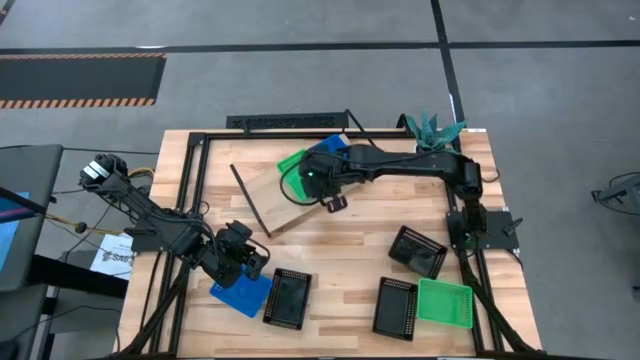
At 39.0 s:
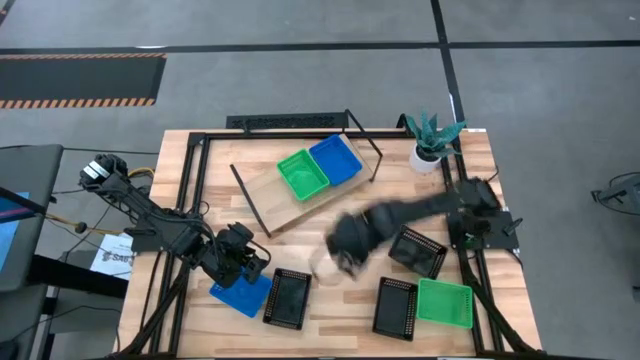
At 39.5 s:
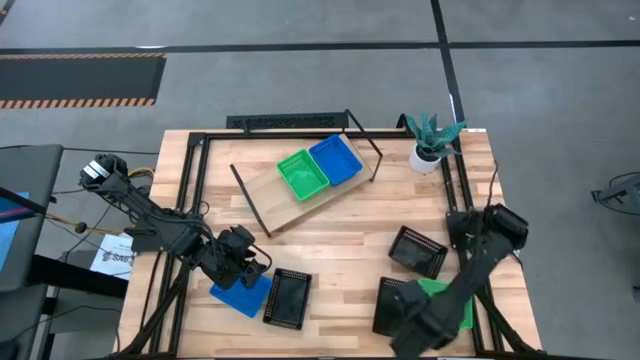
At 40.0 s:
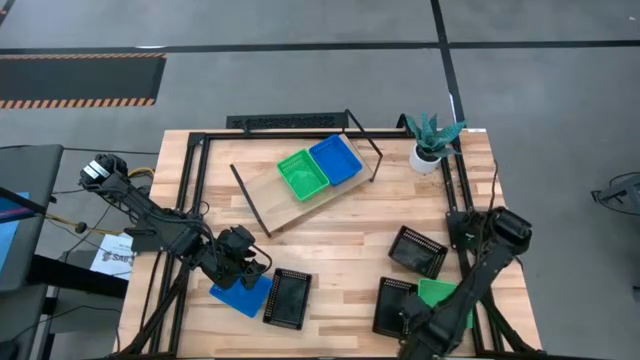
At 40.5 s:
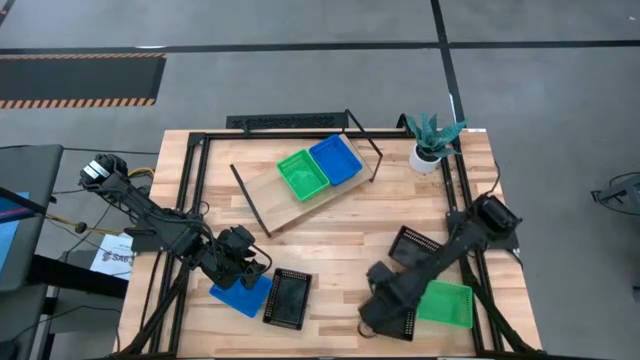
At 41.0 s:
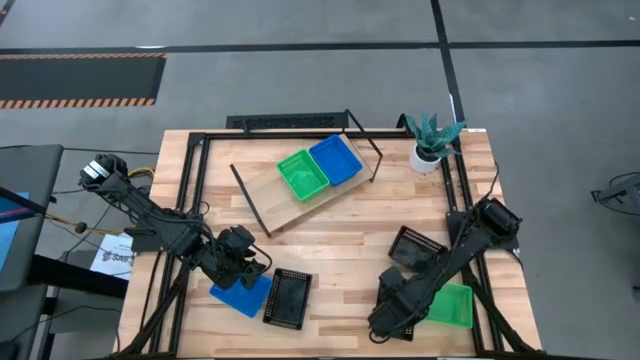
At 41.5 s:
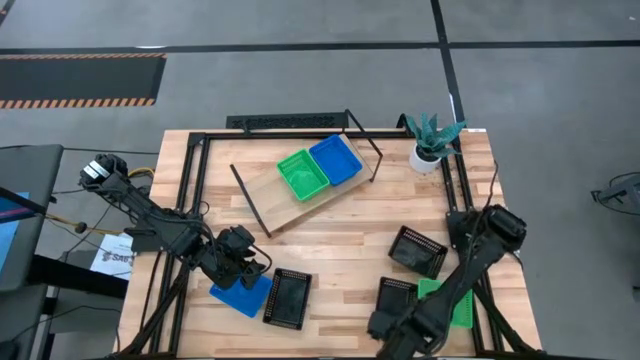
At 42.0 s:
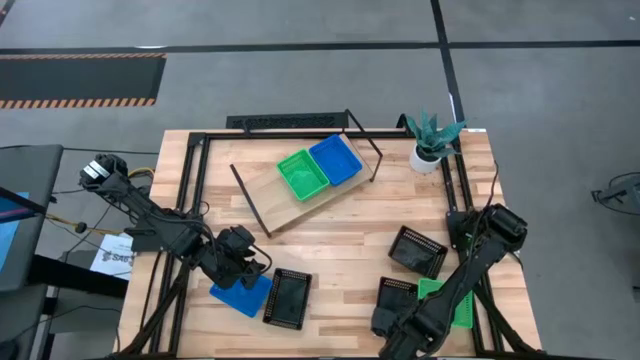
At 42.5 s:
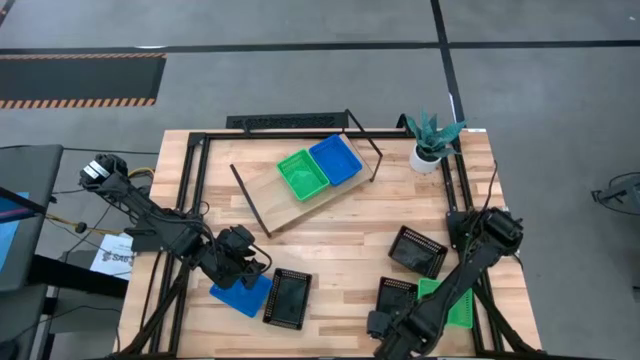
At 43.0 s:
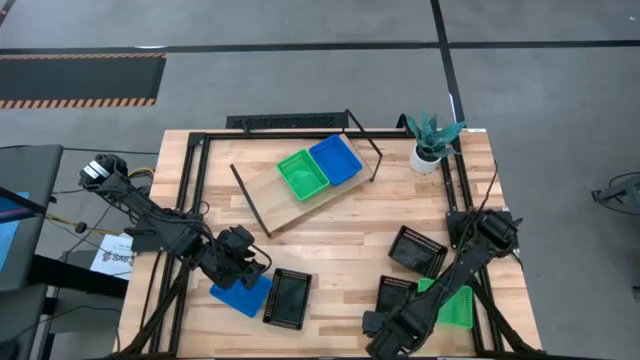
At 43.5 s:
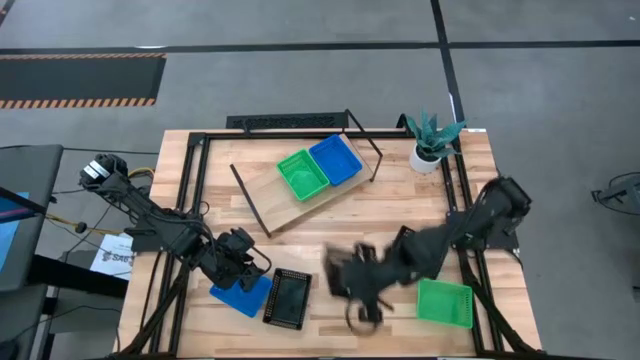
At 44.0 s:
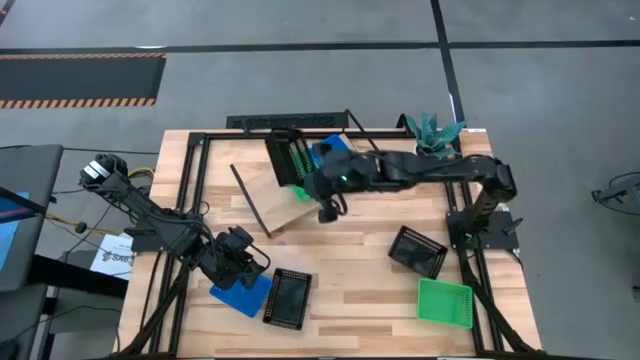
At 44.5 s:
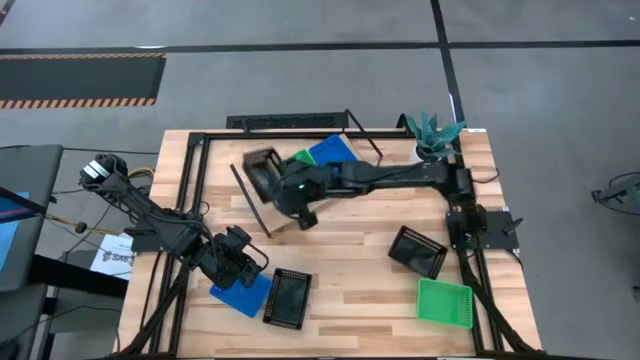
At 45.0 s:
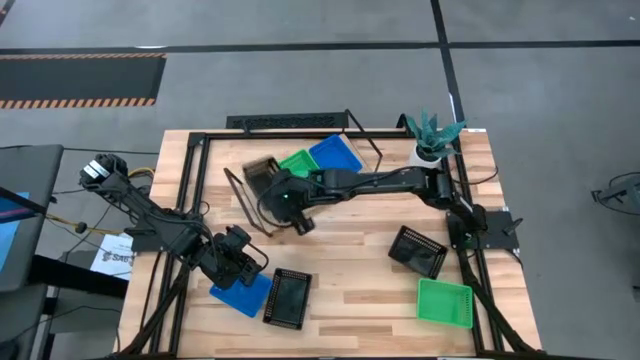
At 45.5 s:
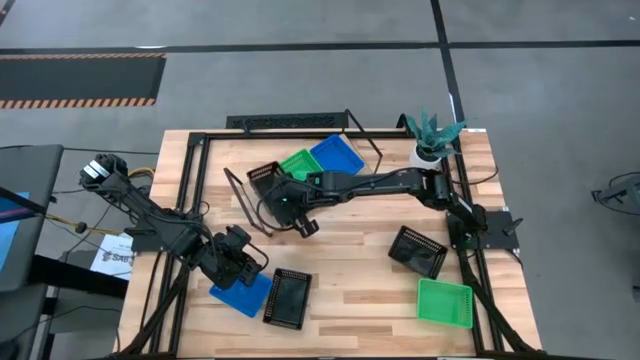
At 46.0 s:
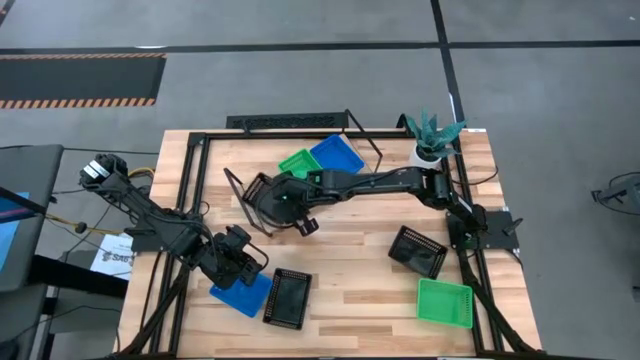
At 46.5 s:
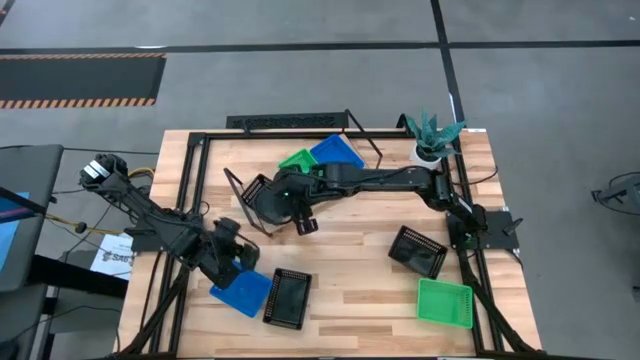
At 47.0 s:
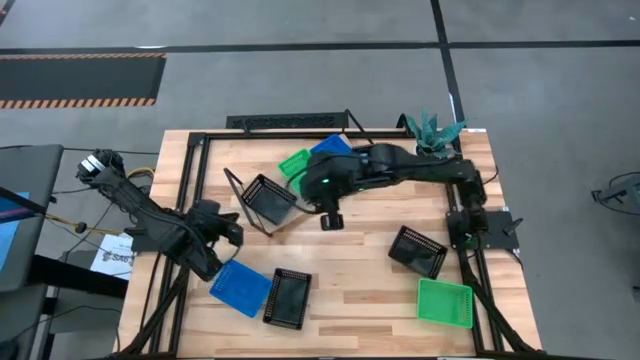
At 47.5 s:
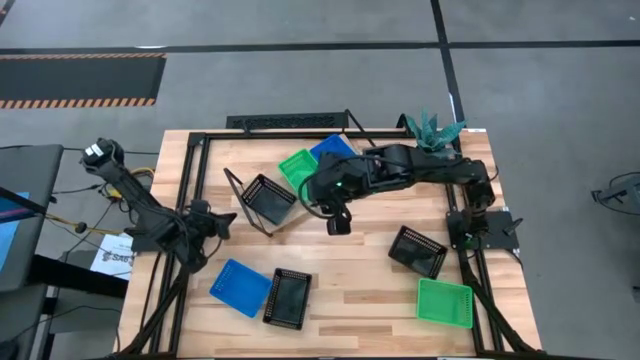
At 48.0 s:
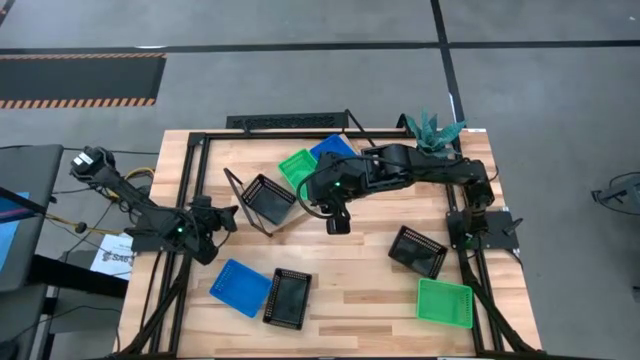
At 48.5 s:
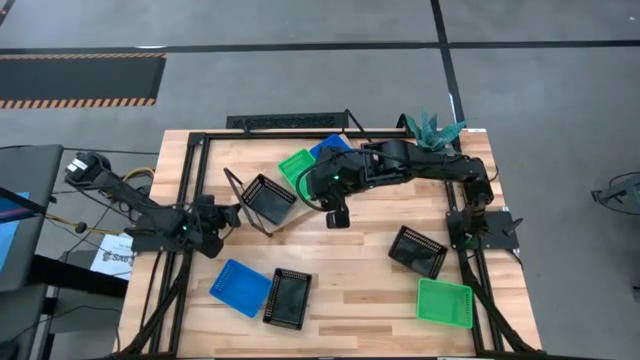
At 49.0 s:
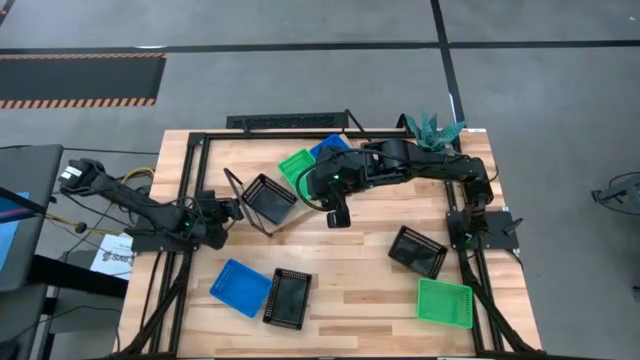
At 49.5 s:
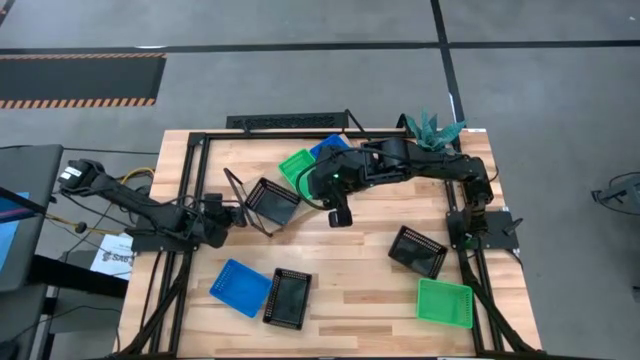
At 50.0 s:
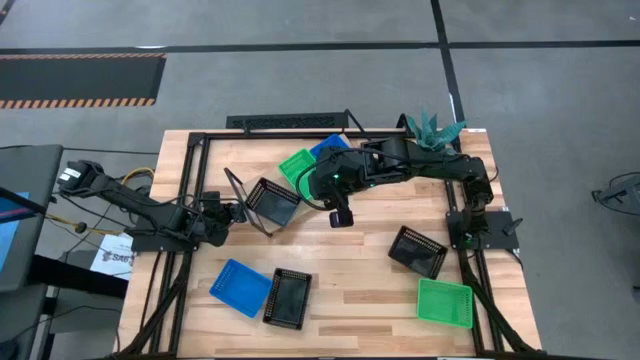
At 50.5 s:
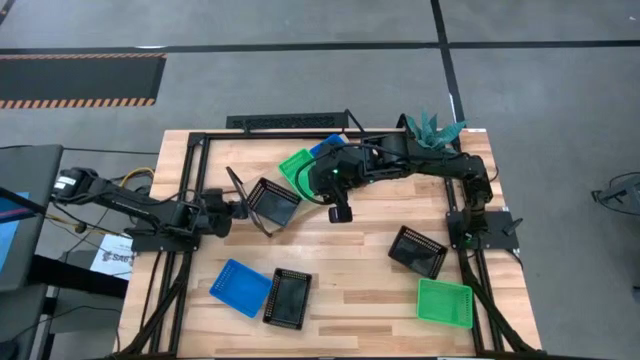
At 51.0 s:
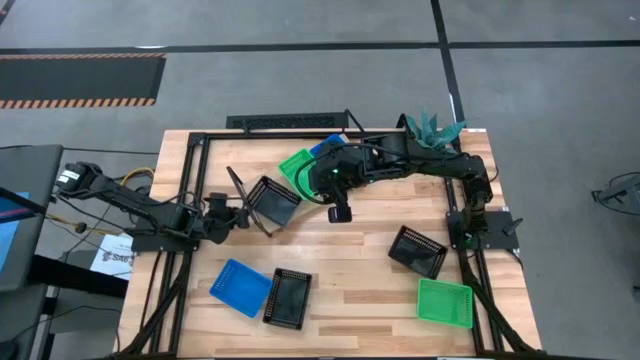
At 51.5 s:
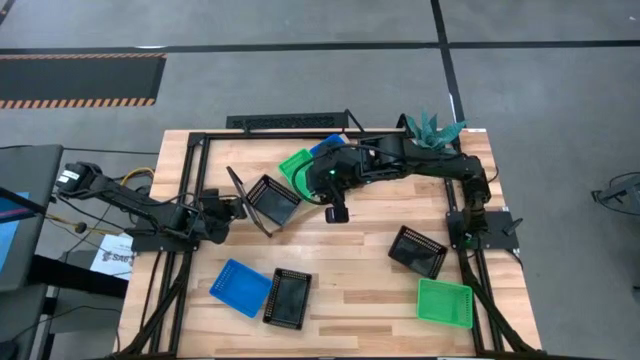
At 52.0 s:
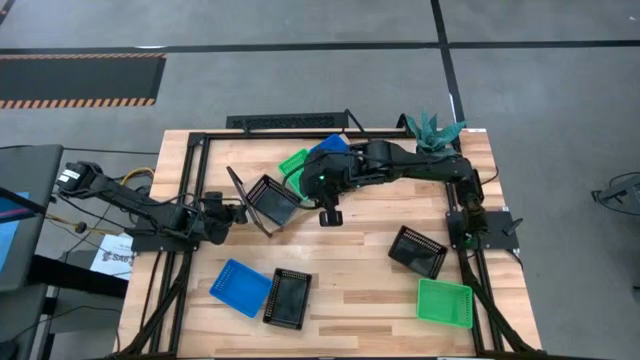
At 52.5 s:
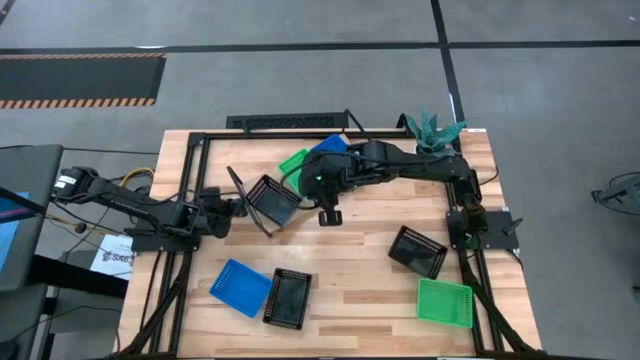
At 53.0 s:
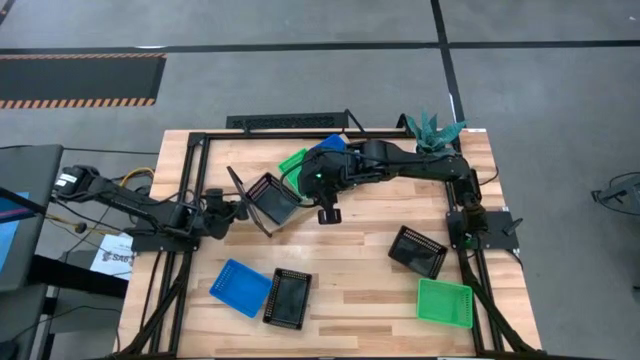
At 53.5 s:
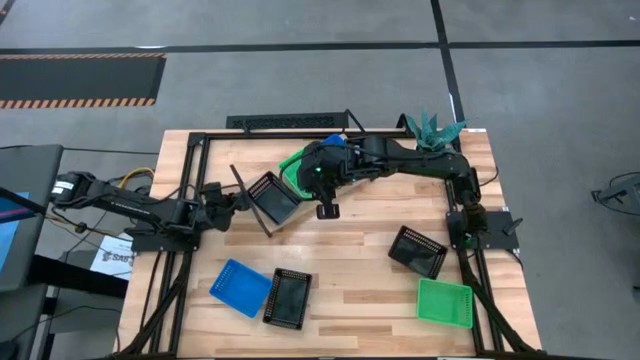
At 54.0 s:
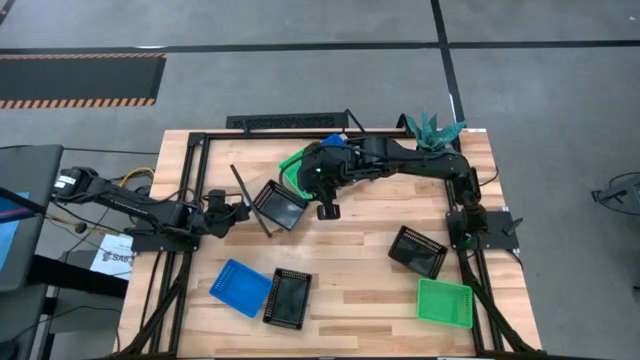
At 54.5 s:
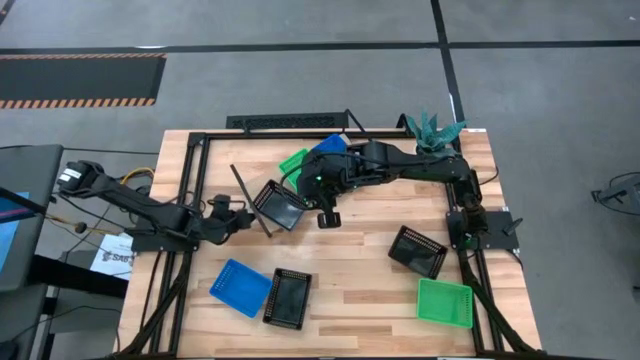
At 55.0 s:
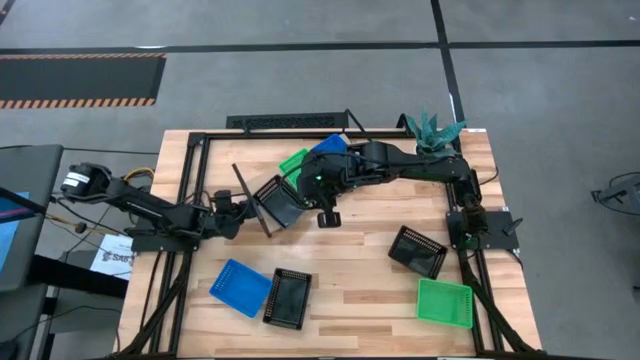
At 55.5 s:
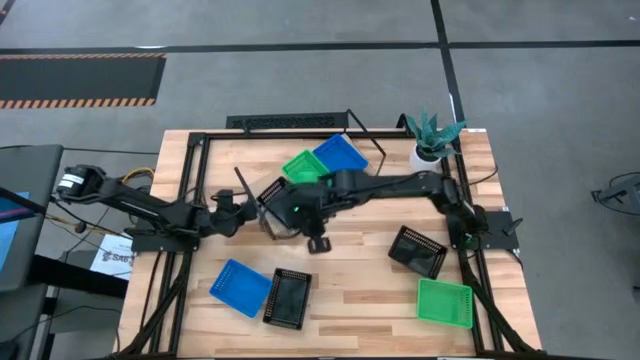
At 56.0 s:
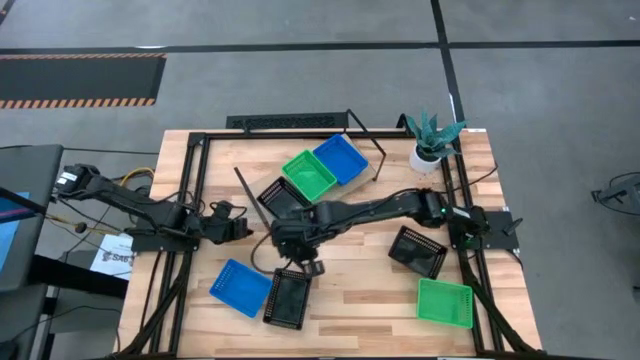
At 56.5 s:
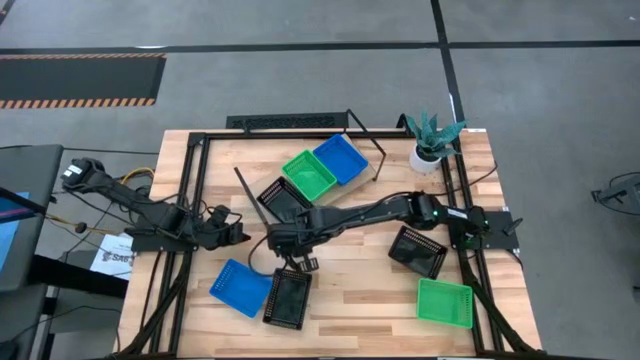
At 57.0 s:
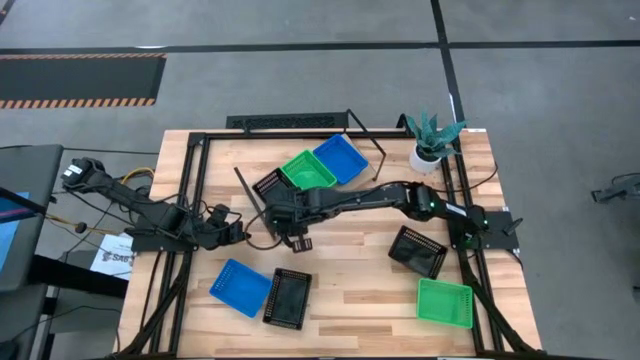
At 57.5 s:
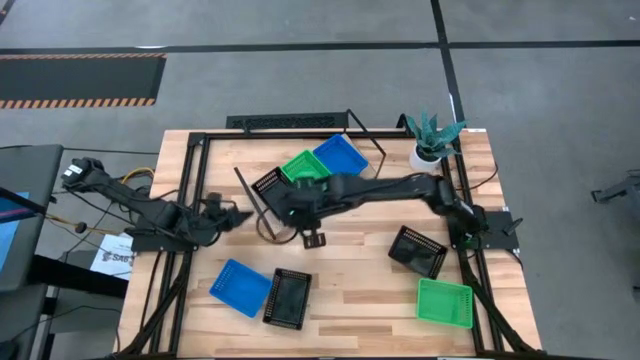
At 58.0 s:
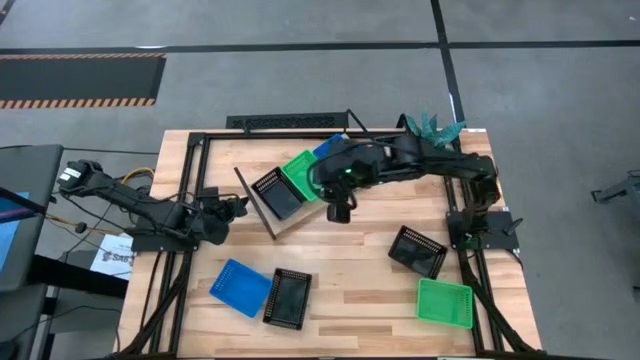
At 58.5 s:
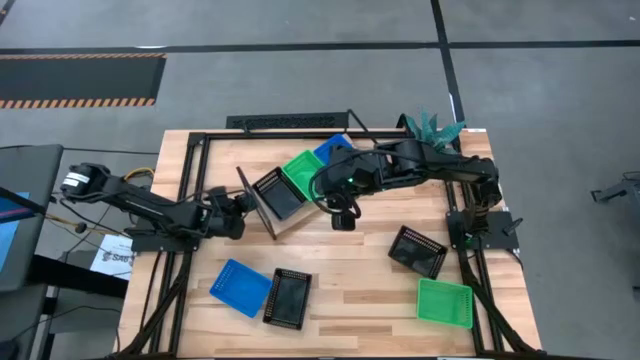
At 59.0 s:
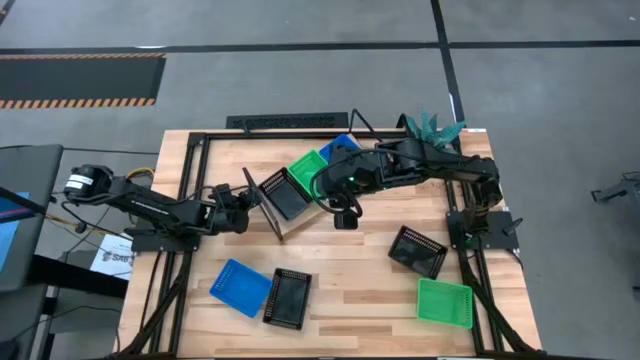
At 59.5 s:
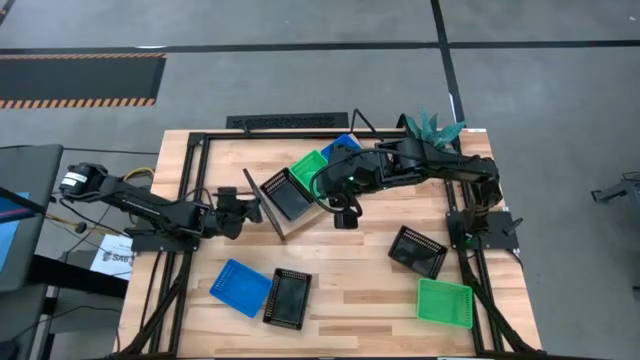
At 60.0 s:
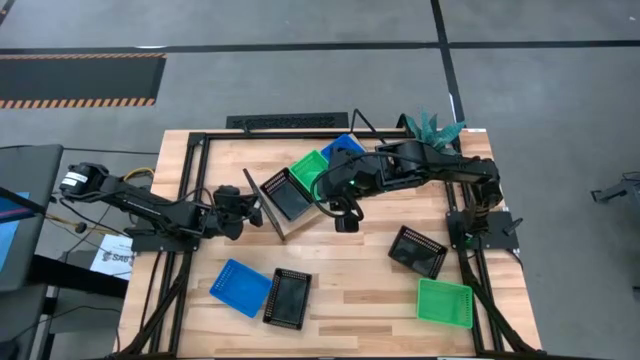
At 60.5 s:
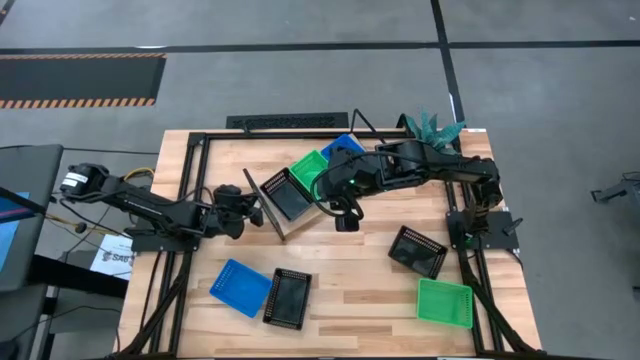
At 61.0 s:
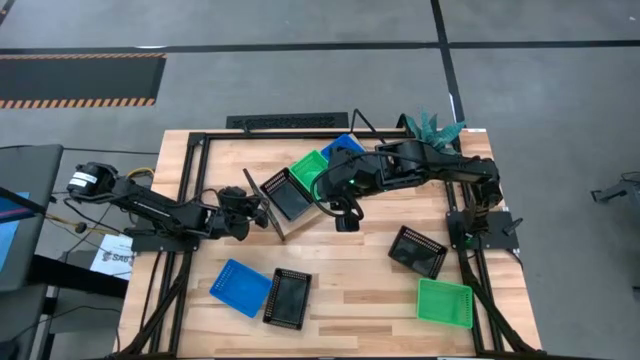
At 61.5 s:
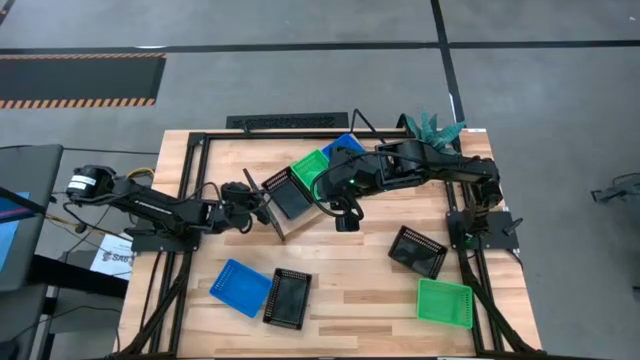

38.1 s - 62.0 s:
Task: Stack baskets on shelf by color
Put the bottom right black bin on the shelf
